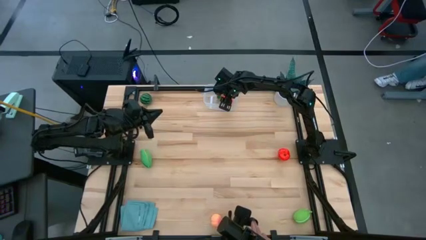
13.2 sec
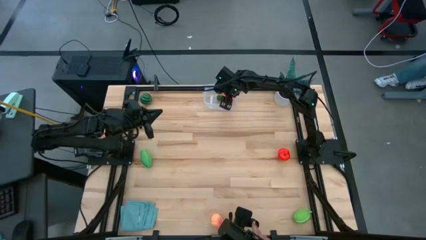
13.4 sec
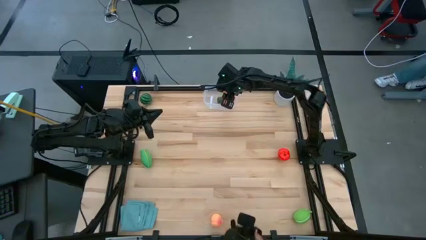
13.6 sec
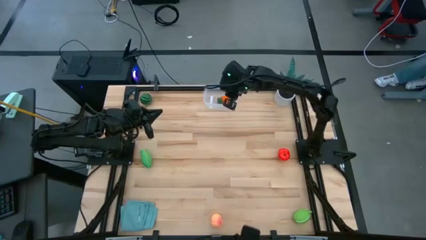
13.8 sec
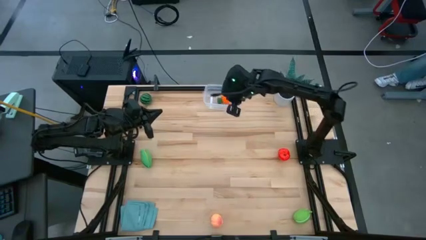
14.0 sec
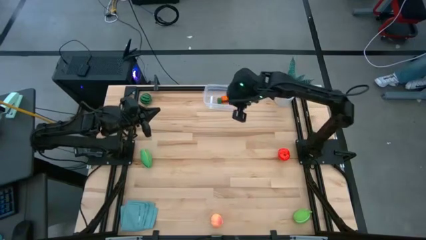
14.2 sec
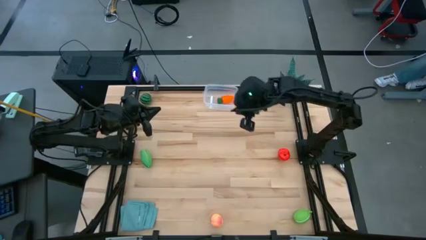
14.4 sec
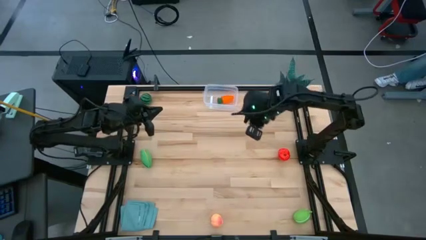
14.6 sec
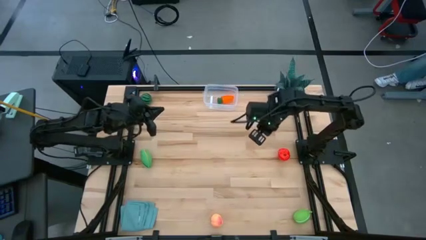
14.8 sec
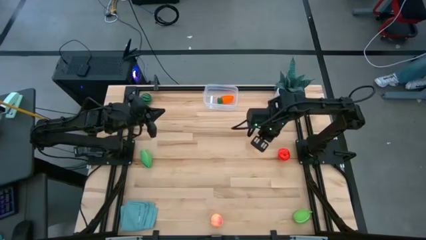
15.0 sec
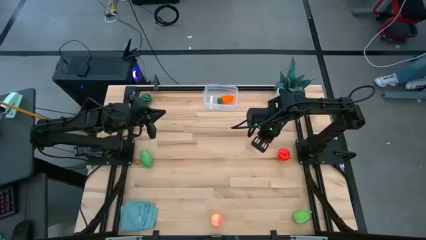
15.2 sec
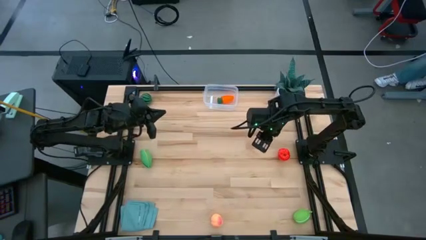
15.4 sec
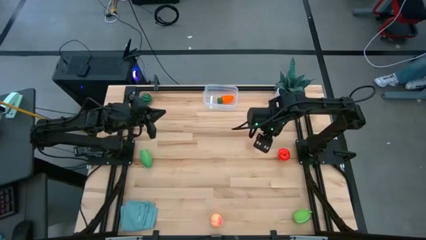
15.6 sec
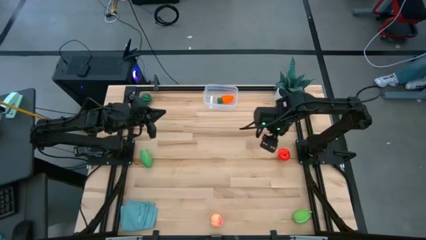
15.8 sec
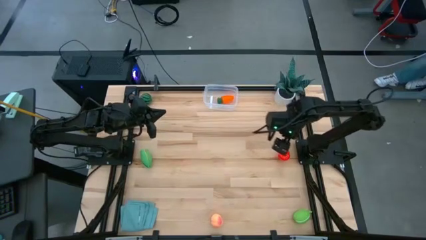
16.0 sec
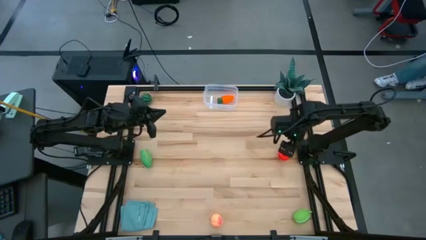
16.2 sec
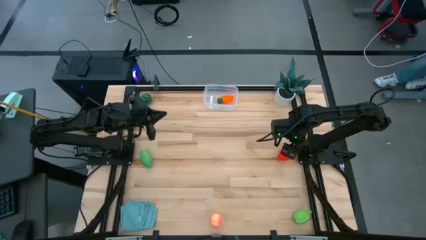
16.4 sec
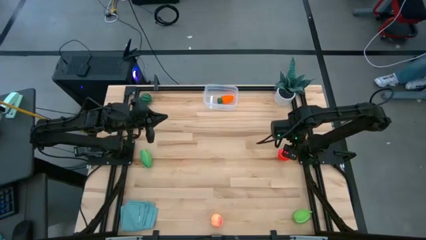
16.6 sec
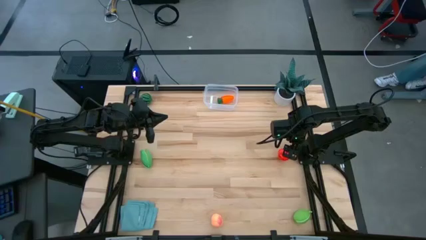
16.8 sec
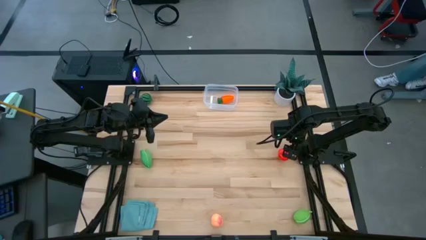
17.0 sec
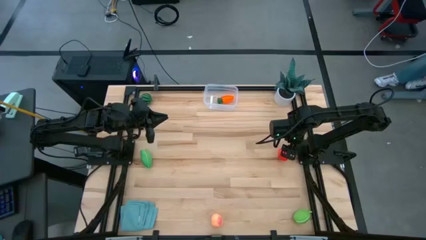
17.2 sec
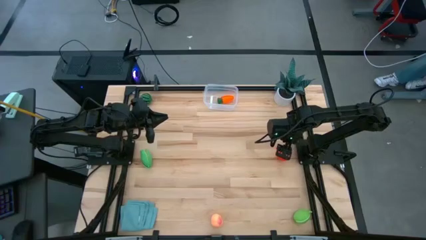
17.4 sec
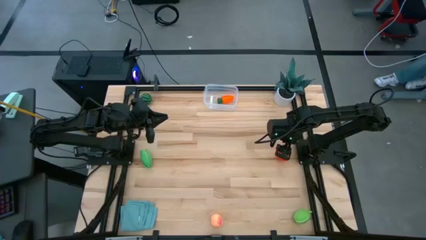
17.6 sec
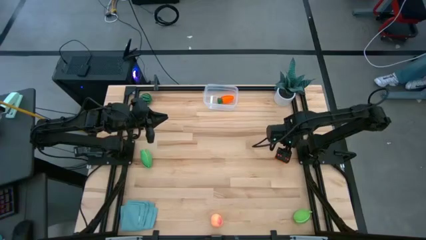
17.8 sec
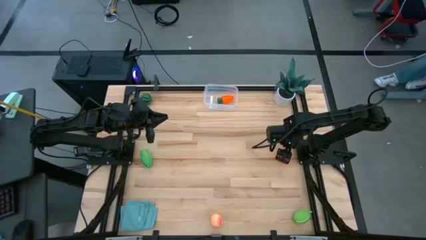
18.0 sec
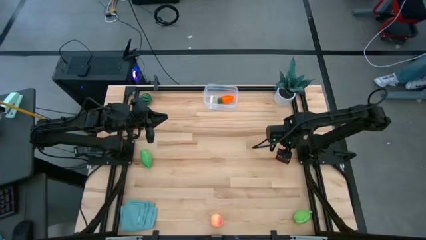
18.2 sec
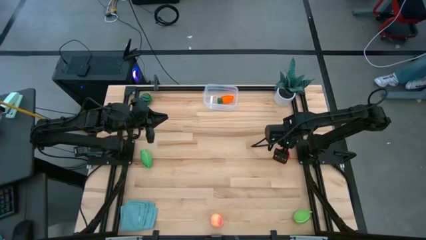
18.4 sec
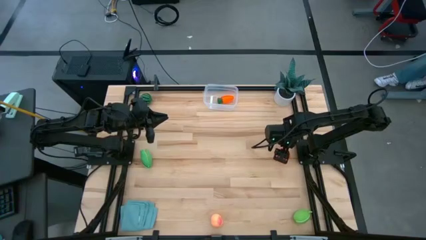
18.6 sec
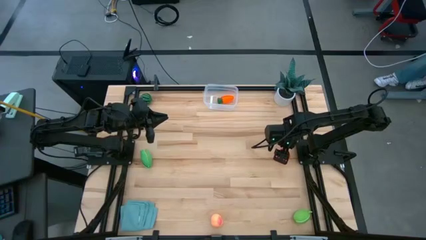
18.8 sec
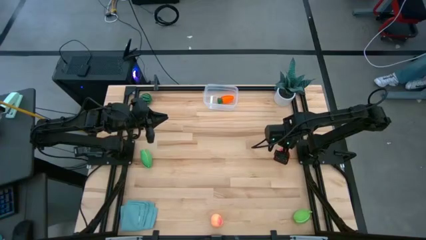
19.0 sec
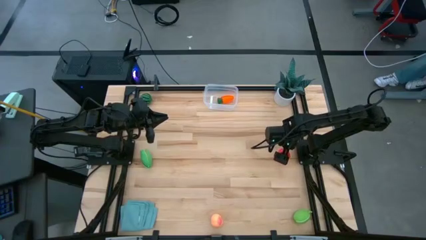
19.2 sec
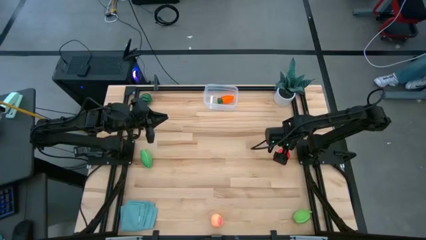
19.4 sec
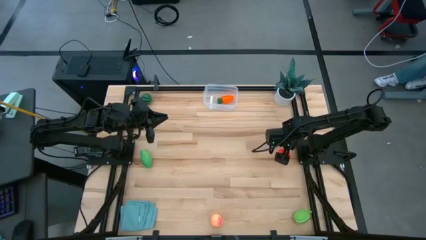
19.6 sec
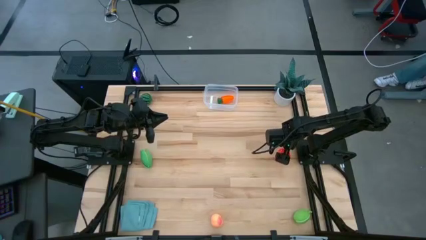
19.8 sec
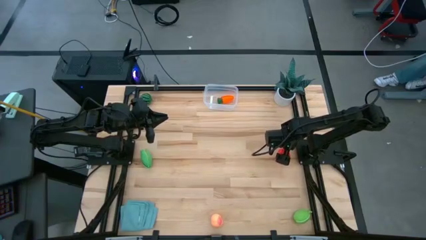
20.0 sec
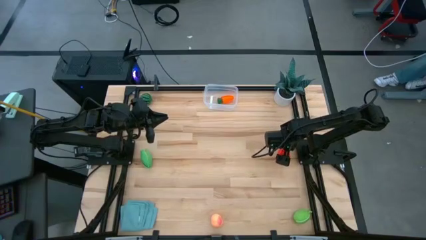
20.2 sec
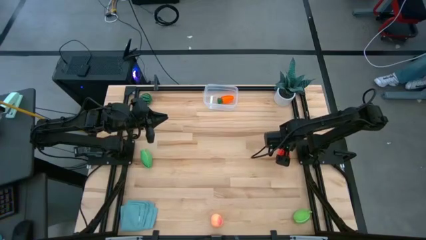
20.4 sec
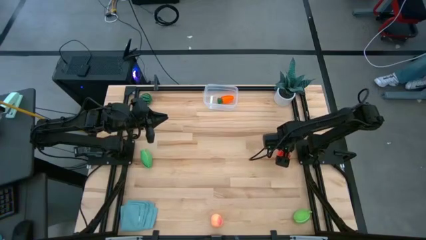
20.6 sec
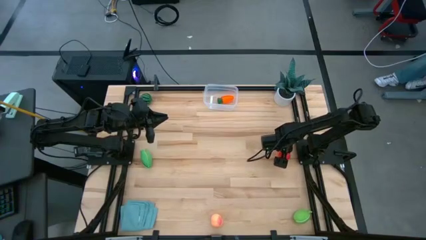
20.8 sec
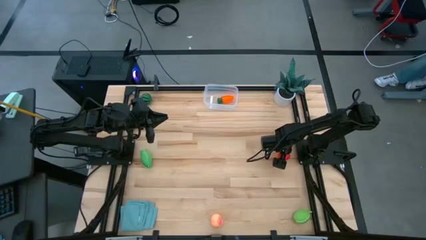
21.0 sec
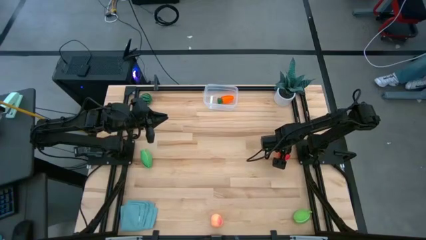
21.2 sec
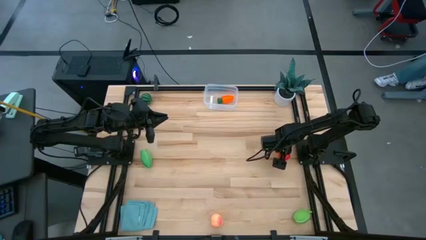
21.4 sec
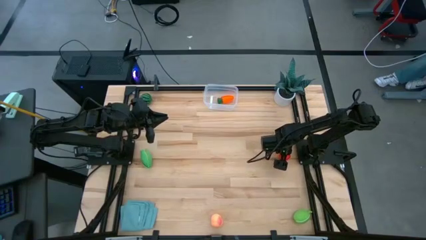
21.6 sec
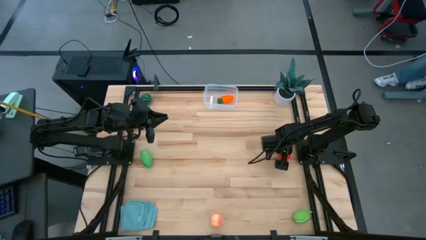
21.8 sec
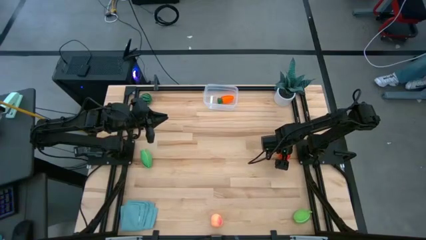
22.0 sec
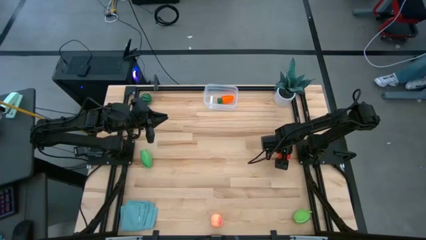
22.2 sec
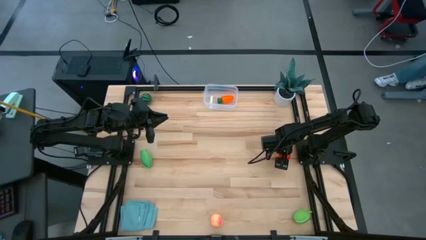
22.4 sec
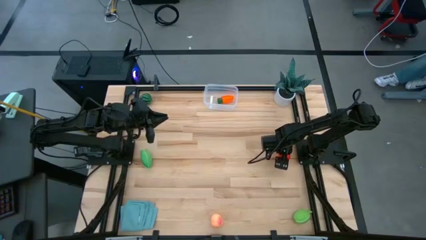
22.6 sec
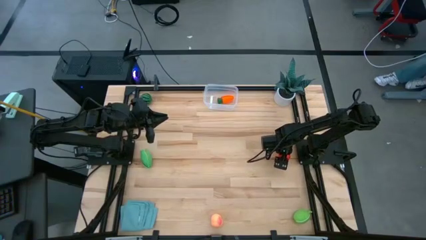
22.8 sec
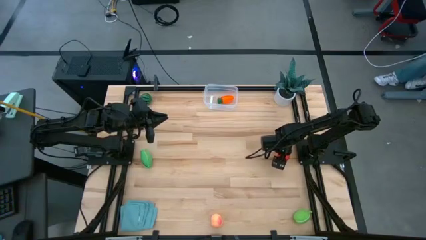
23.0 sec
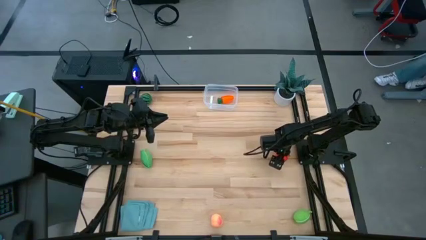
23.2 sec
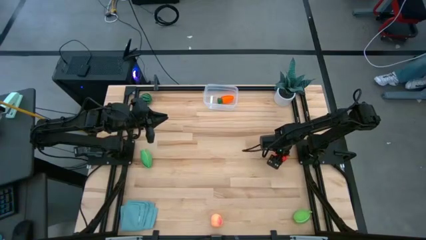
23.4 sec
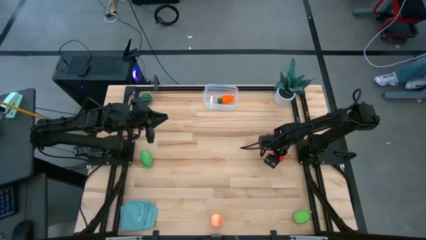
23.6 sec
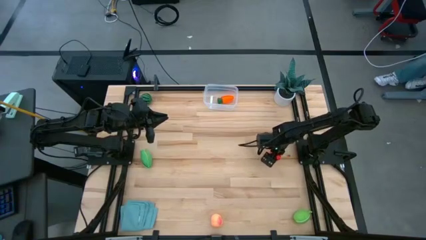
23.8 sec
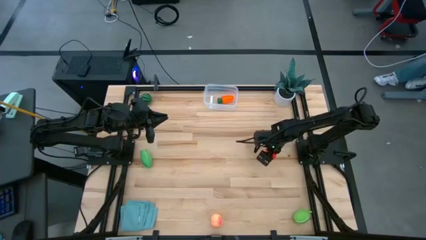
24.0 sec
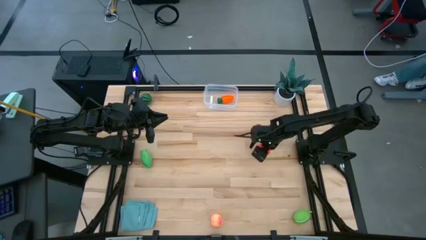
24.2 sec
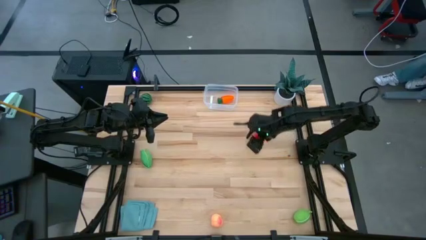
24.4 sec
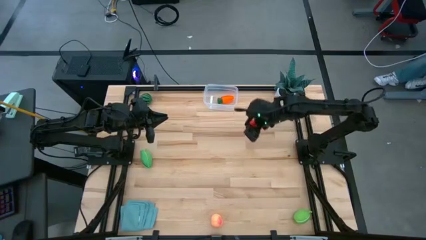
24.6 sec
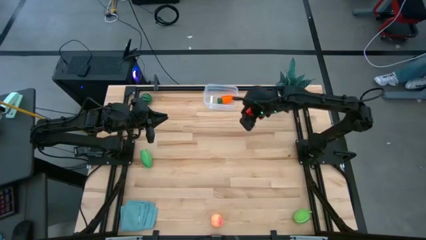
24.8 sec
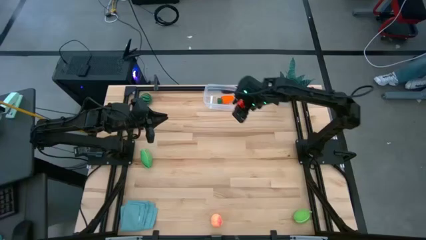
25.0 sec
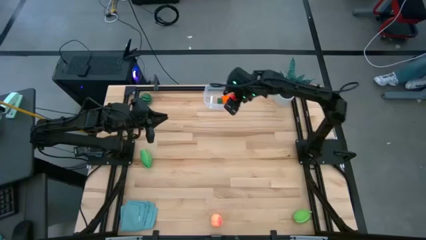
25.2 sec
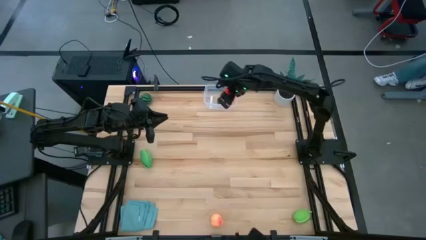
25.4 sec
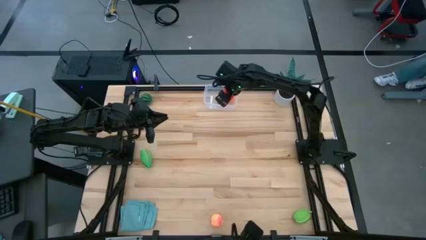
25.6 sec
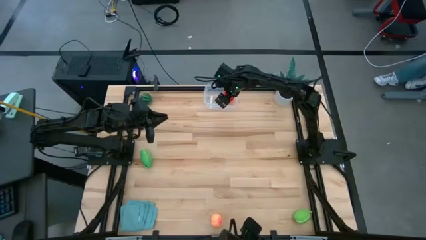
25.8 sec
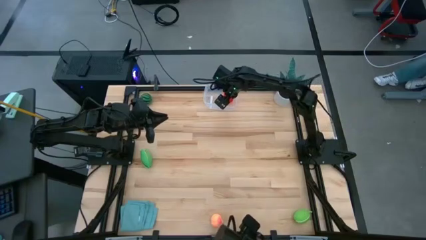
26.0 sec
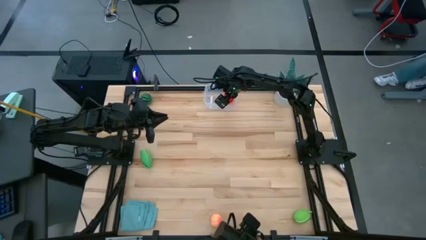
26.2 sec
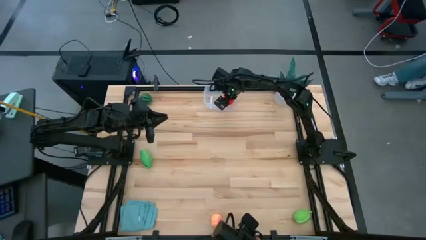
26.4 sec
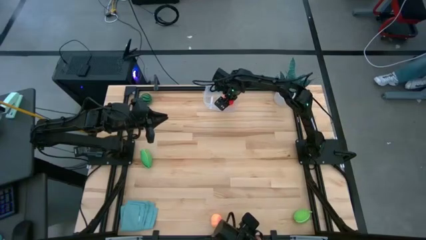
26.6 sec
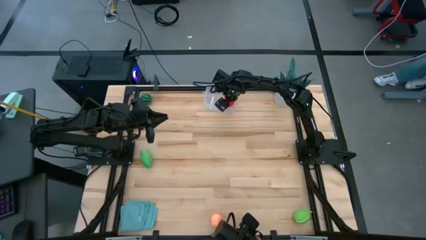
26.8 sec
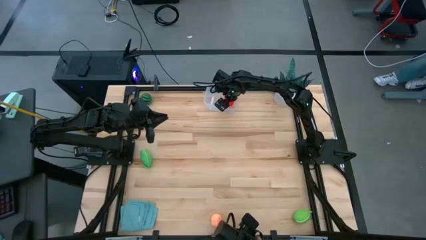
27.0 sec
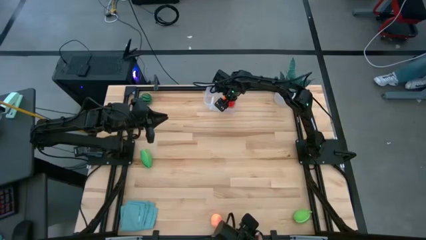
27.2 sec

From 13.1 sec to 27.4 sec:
Task: Pick and placing Produce into tupperware
Put the red apple into the transparent container
